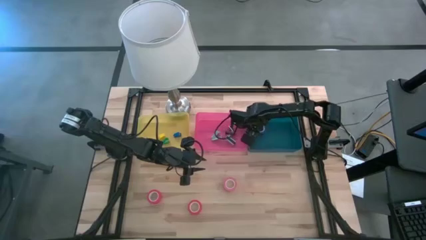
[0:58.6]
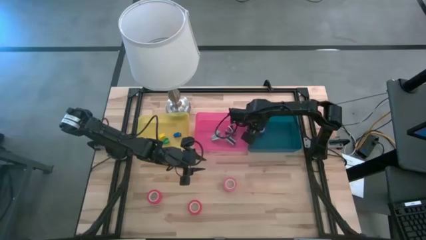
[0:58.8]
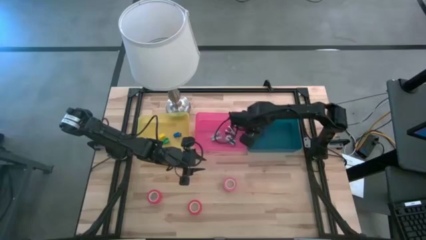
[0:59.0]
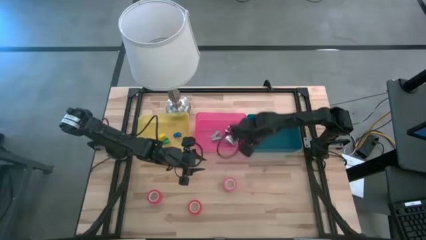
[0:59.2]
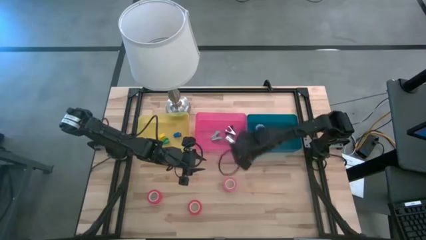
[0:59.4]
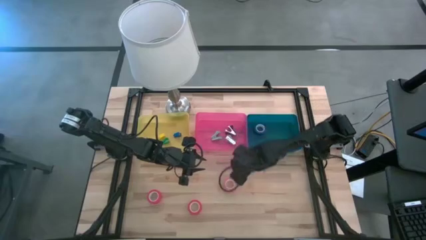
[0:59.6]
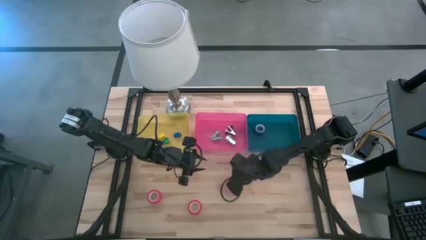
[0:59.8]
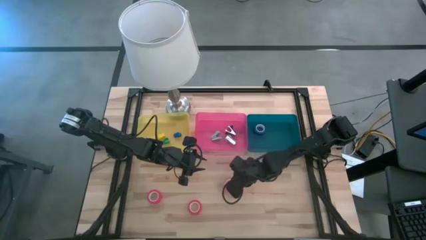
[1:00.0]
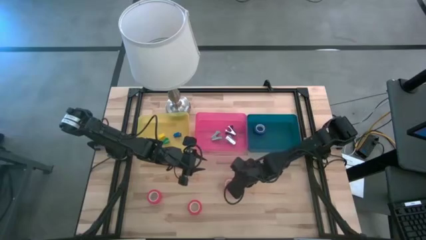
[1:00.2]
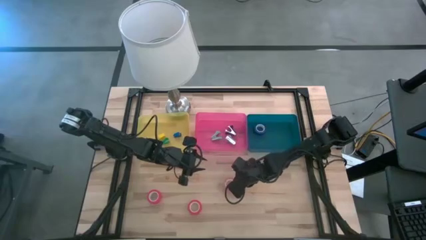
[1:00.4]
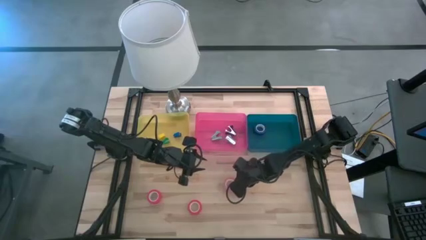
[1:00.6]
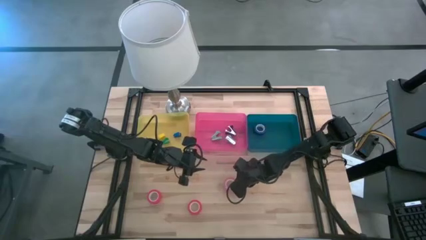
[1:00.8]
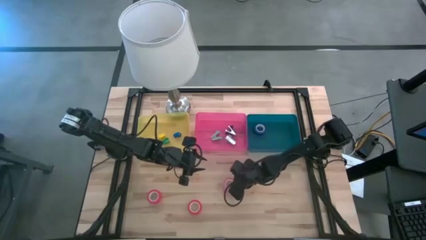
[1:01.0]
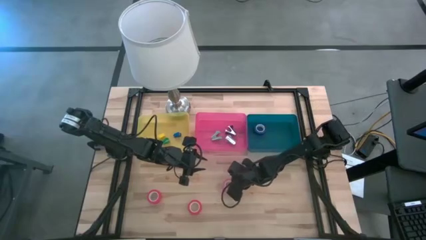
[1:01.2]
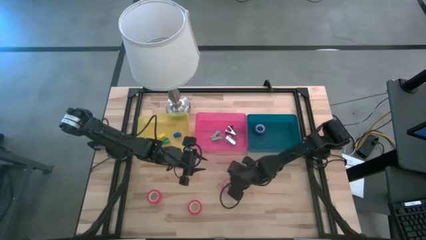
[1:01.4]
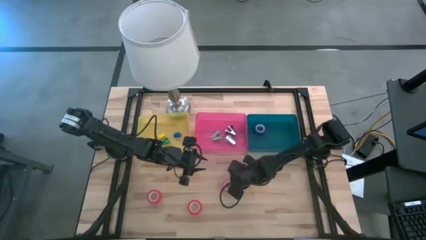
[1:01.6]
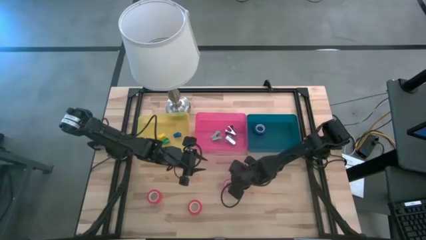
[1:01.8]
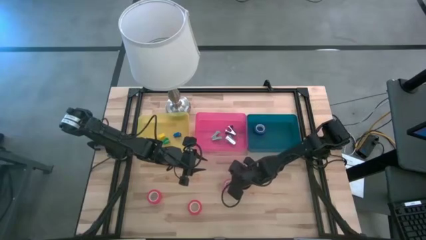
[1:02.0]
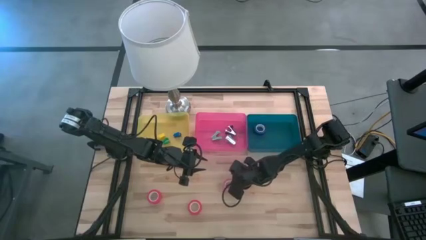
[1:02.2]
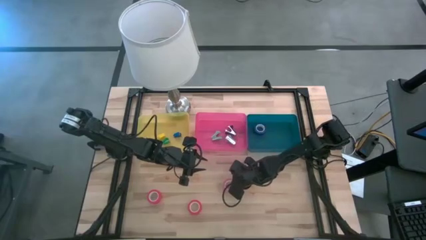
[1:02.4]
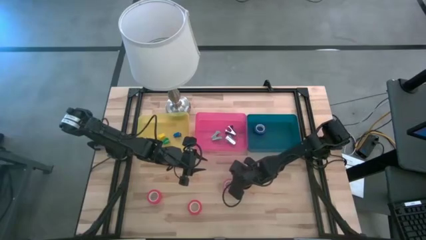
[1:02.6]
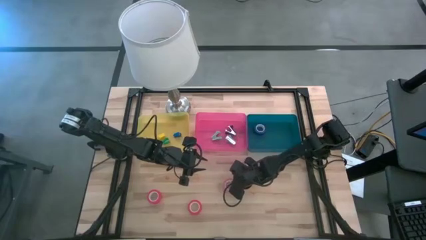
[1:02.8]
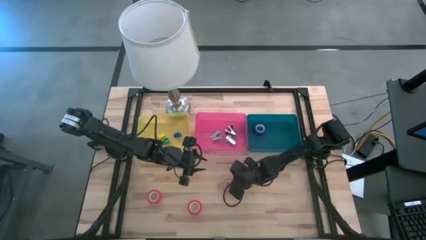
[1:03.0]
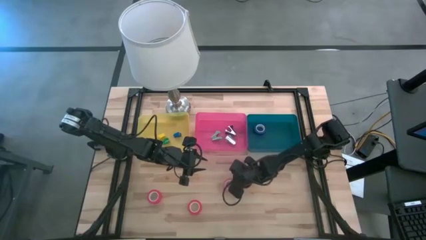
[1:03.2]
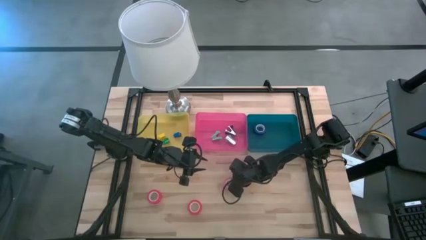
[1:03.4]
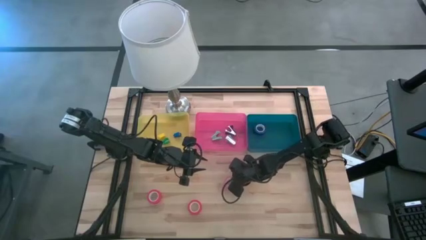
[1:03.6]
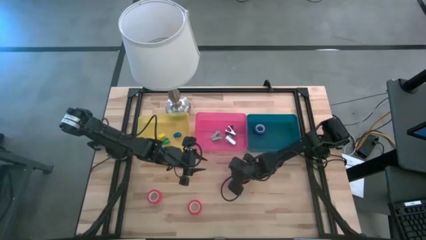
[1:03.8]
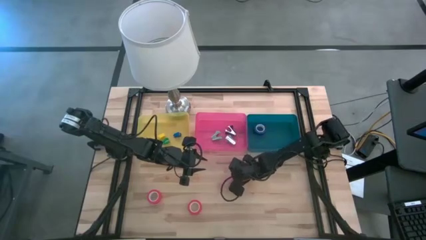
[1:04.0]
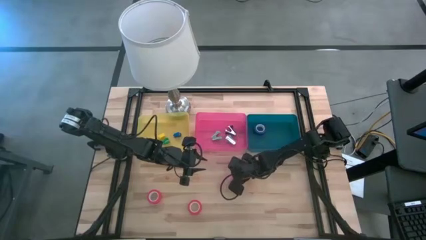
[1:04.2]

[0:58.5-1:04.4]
Task: Pick and place Stapler, Stapler remover, tape
Put the pink tape into the blue bin

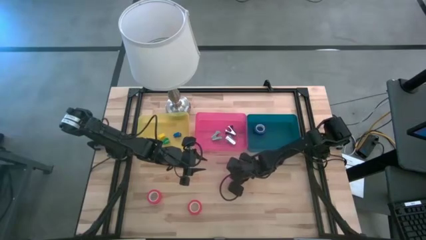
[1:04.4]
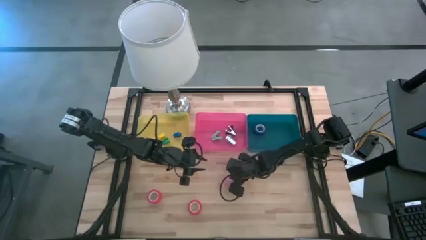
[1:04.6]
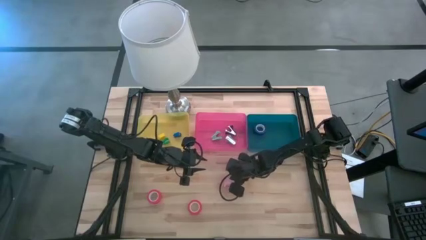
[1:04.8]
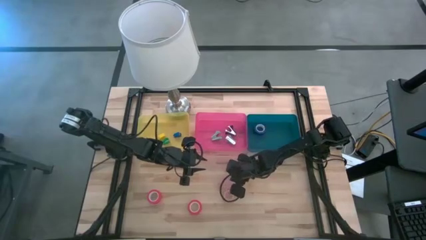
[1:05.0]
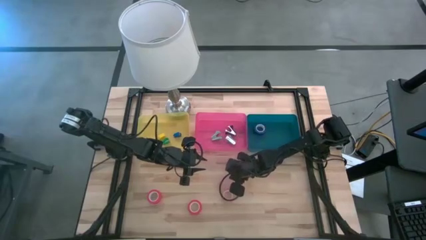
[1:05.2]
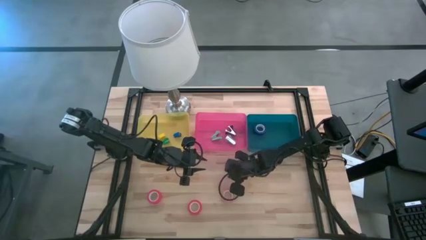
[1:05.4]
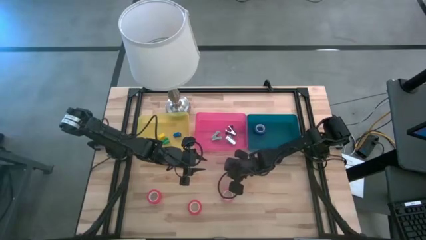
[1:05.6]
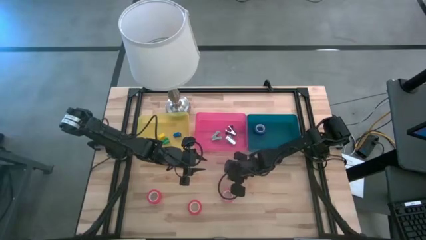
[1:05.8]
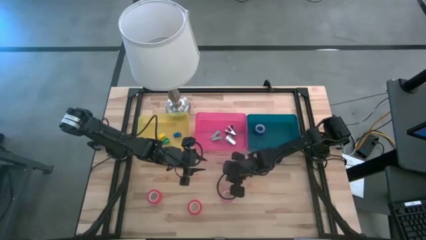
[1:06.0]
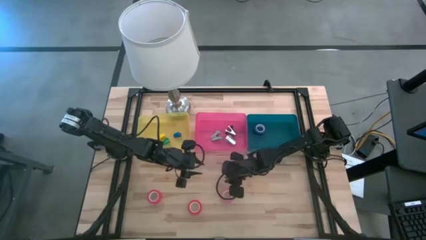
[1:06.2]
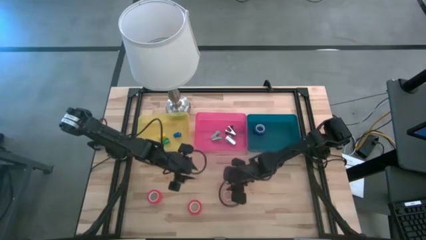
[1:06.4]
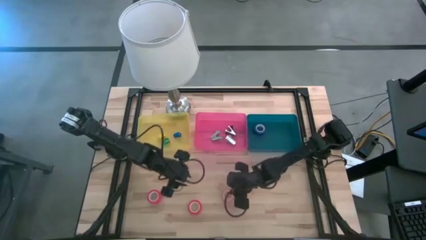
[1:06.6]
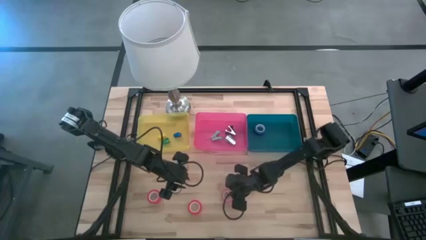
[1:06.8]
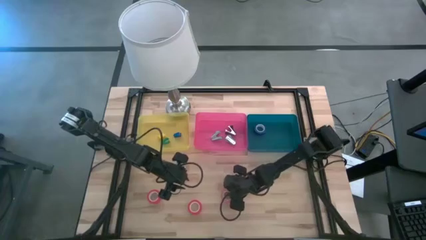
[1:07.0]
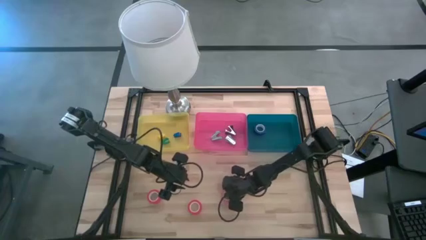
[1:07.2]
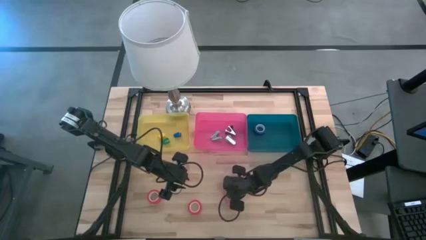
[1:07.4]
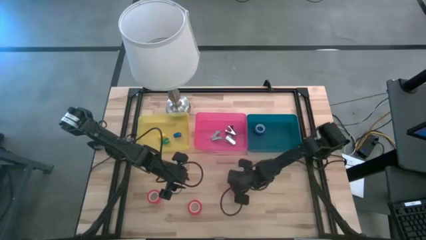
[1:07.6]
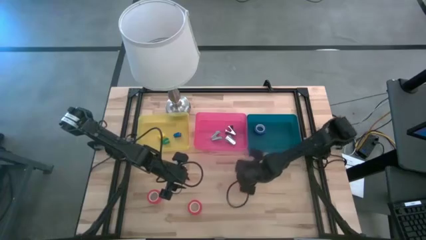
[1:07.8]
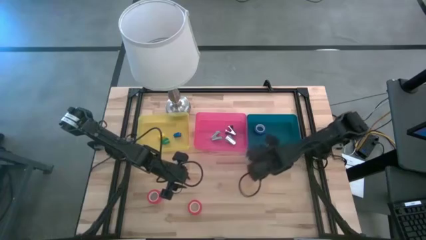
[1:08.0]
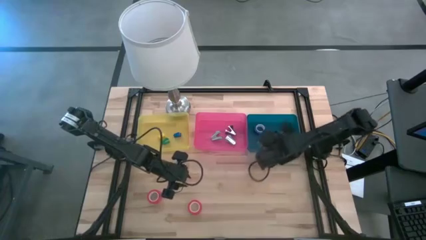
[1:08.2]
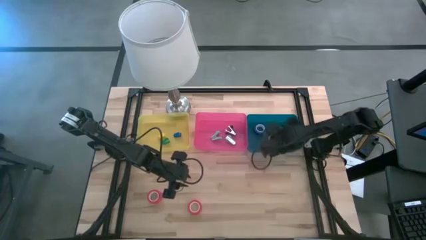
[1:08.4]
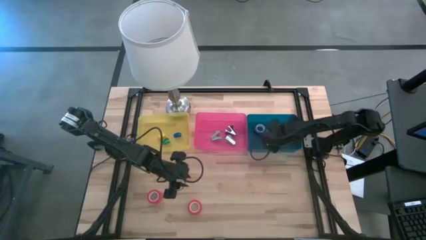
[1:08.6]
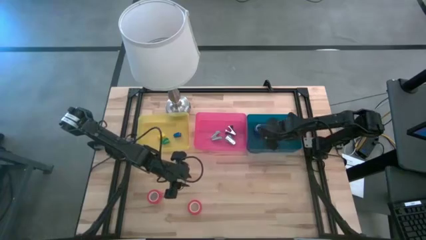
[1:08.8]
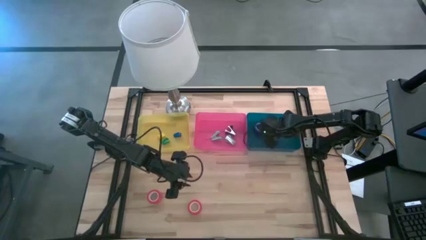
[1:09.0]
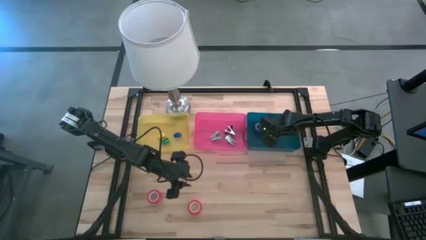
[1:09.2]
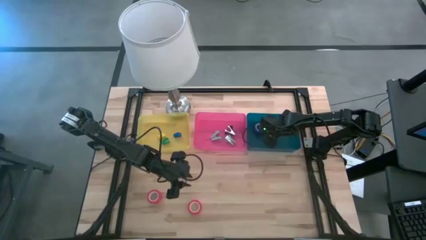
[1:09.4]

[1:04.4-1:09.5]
Put the pink tape into the blue bin

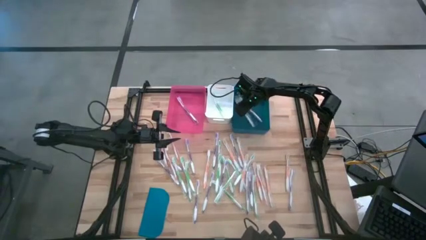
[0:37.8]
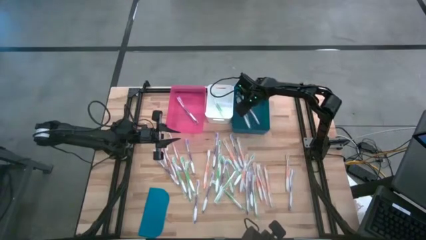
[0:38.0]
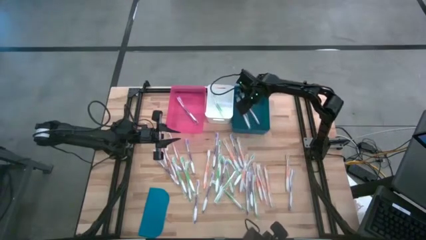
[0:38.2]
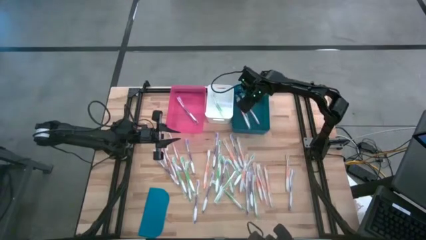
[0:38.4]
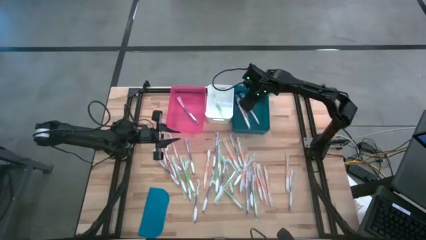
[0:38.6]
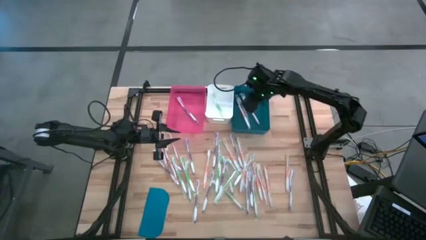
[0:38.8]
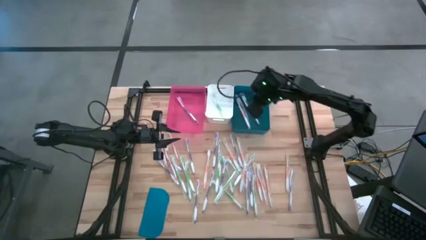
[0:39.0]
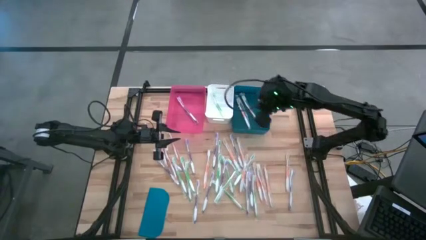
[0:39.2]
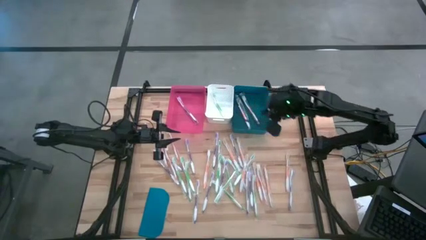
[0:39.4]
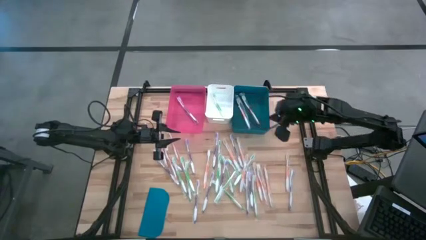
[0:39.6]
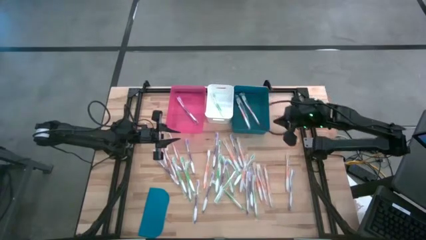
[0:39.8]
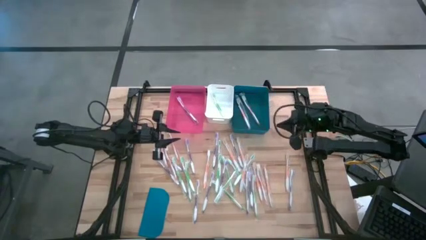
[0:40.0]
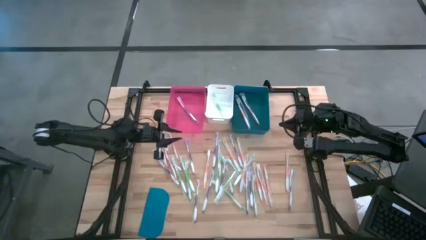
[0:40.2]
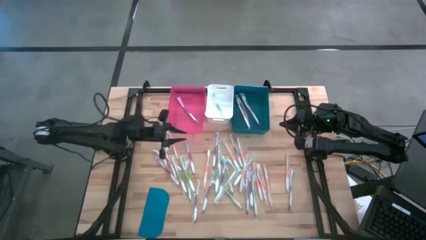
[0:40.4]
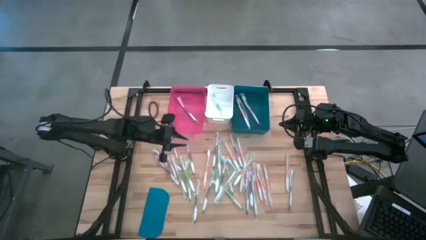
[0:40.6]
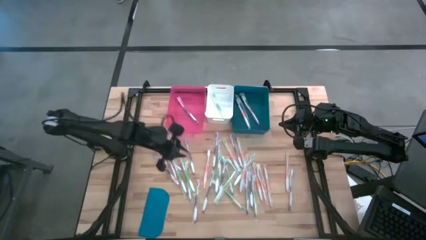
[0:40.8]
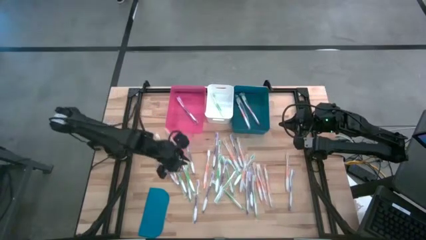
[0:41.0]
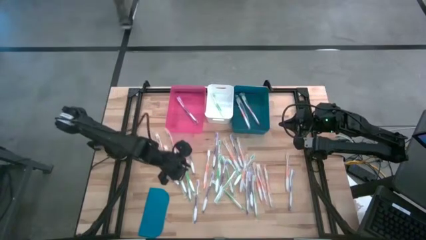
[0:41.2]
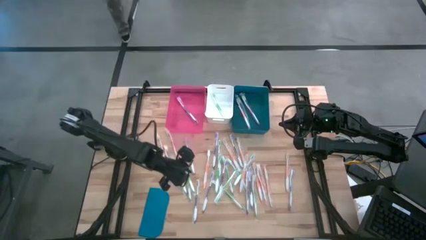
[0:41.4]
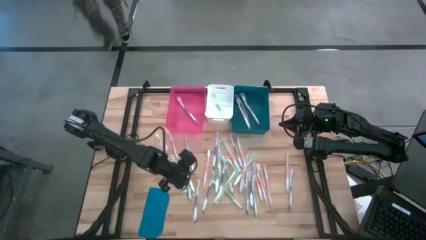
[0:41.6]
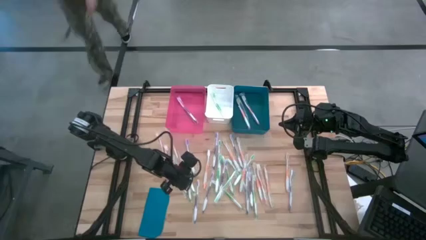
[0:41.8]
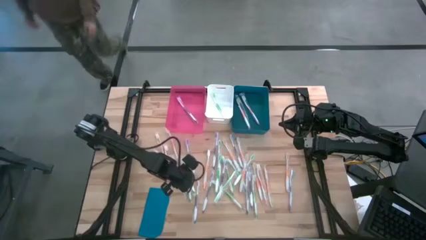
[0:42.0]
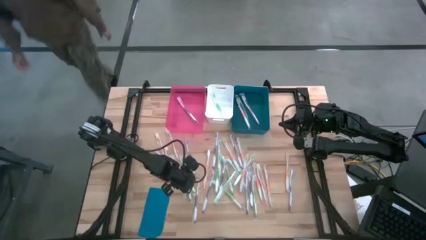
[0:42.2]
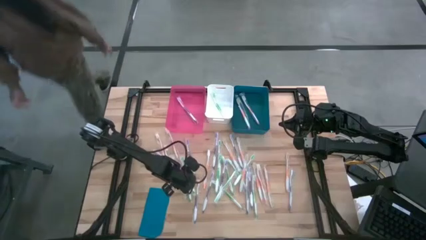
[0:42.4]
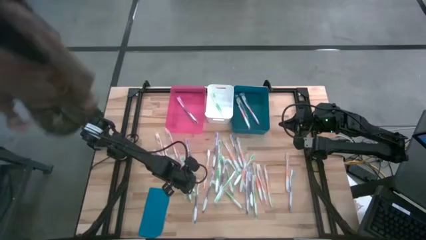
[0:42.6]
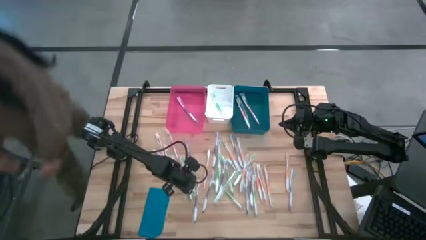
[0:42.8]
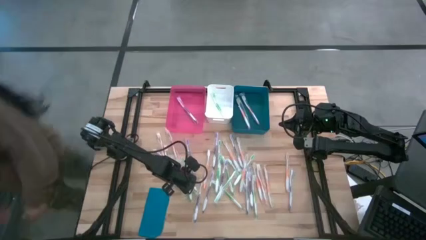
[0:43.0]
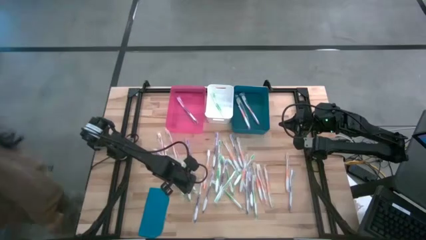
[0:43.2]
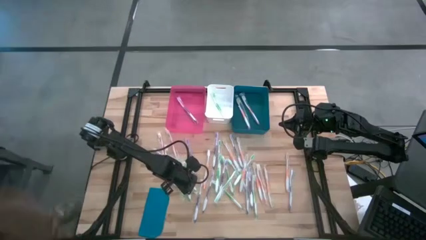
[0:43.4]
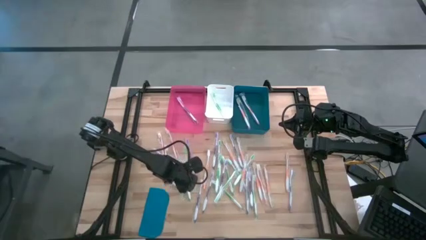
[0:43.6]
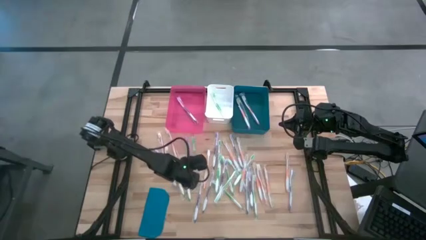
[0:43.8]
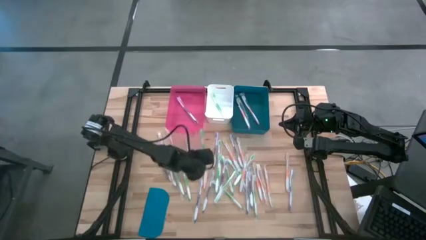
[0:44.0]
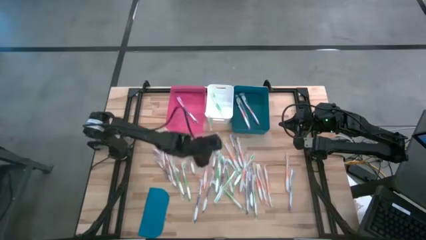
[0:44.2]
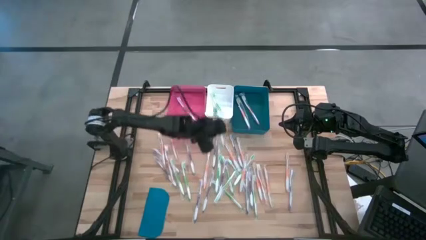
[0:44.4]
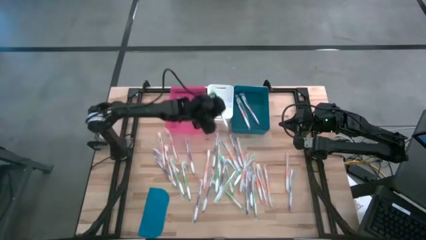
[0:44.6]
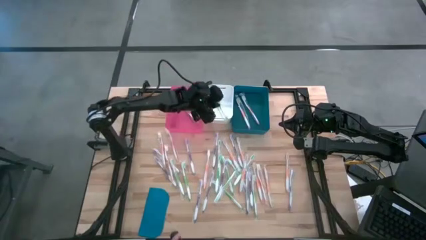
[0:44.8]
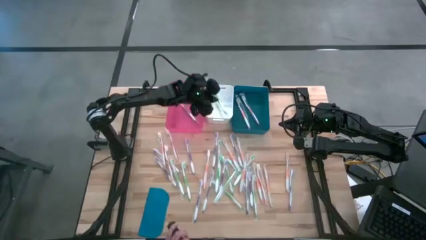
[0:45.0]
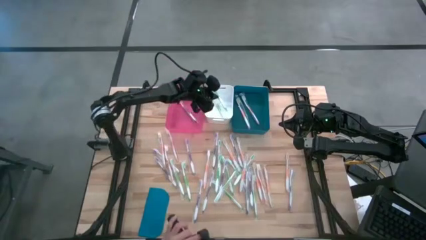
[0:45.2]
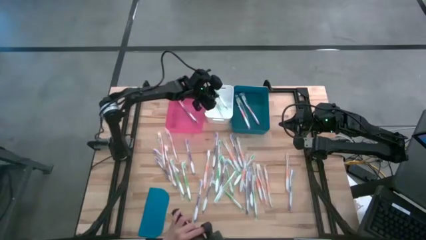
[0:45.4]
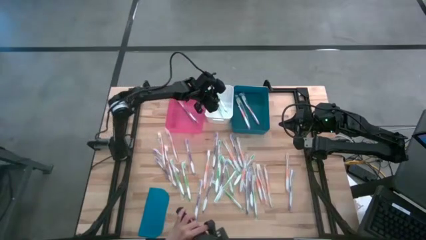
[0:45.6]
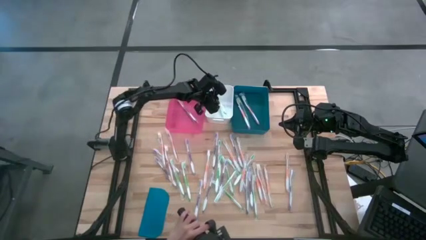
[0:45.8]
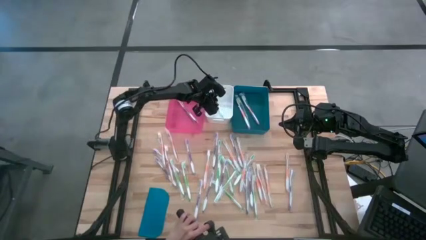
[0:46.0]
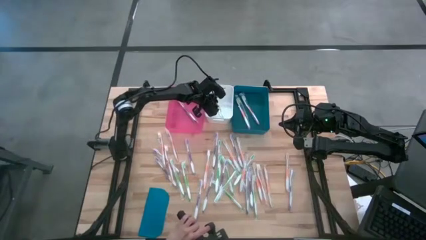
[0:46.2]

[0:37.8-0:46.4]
Task: Pick & Place Toothbrushes
Put the green toothbrush into the white bin
